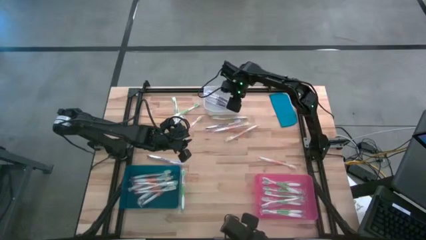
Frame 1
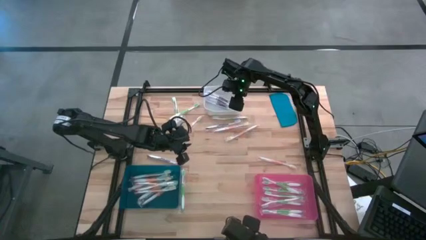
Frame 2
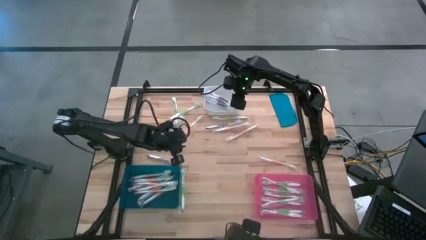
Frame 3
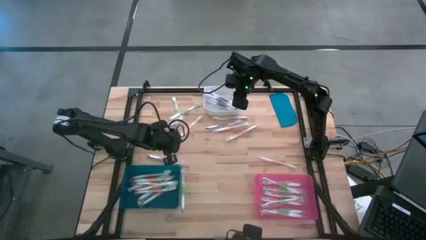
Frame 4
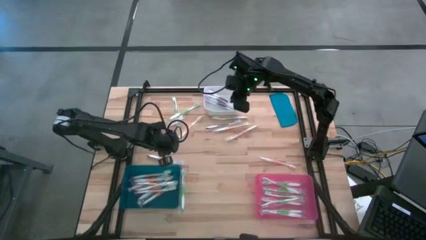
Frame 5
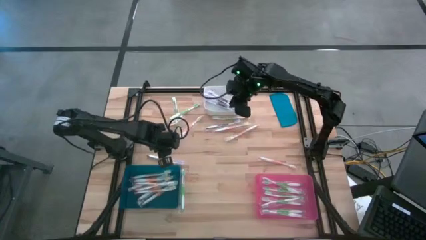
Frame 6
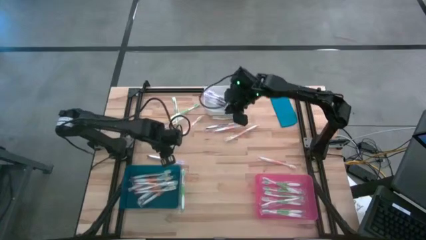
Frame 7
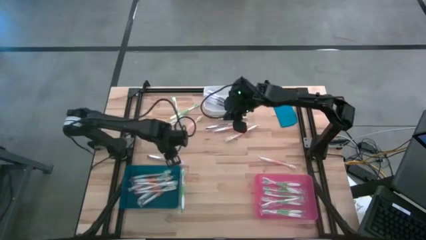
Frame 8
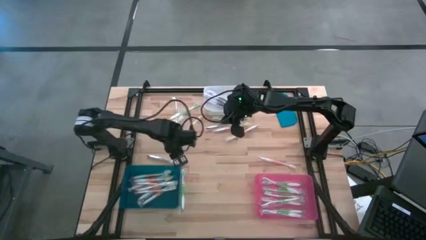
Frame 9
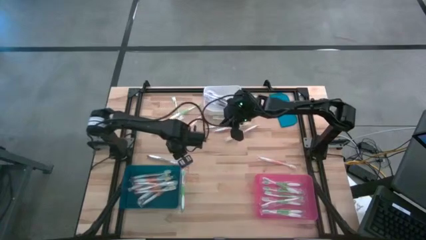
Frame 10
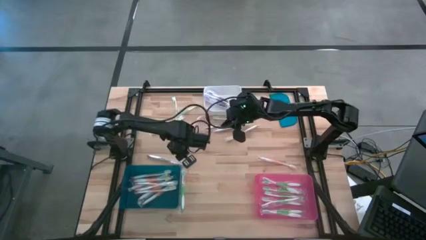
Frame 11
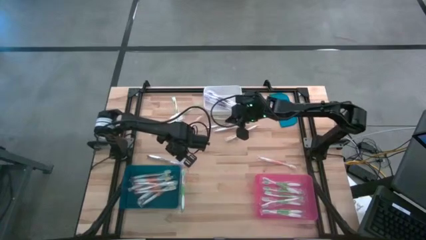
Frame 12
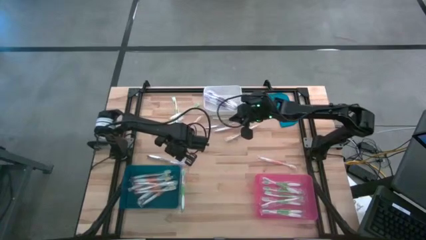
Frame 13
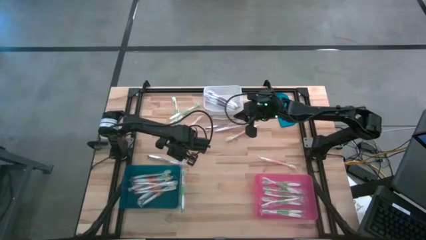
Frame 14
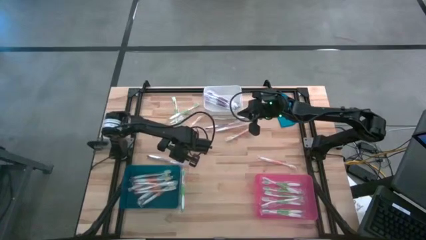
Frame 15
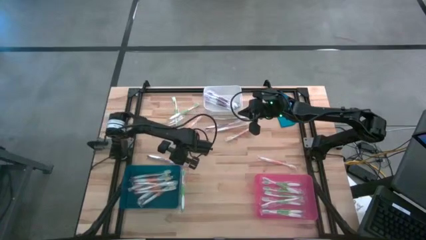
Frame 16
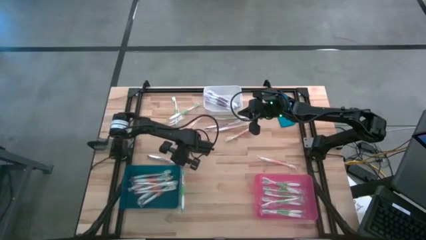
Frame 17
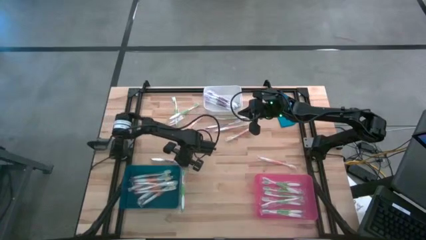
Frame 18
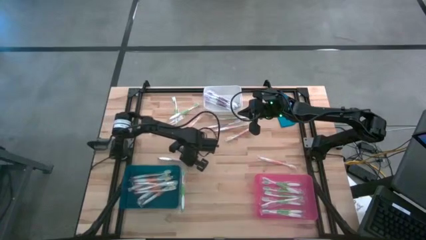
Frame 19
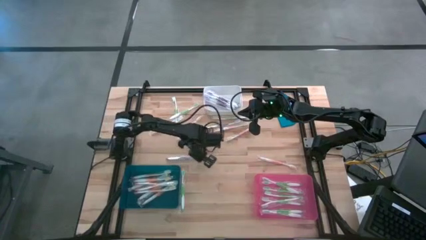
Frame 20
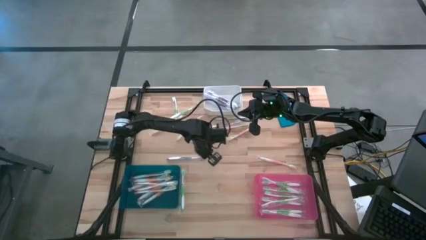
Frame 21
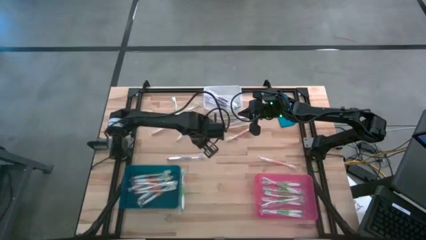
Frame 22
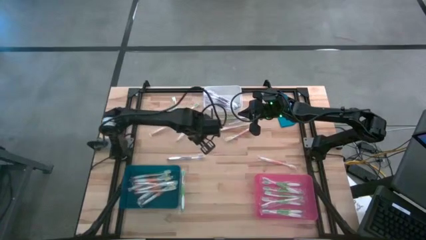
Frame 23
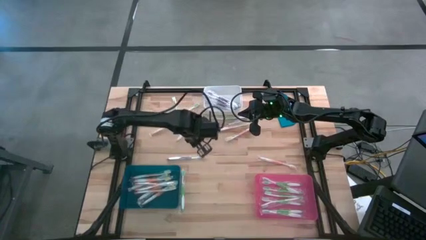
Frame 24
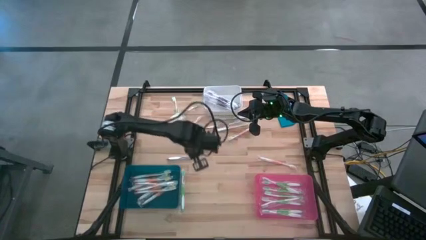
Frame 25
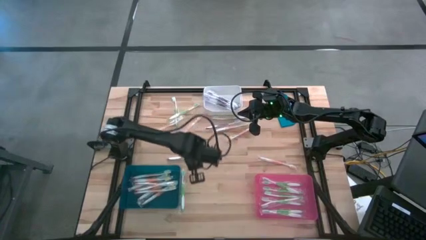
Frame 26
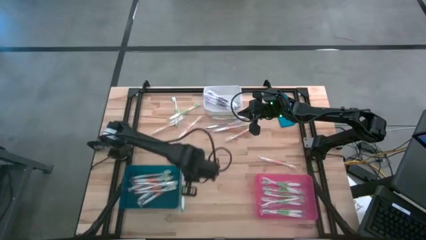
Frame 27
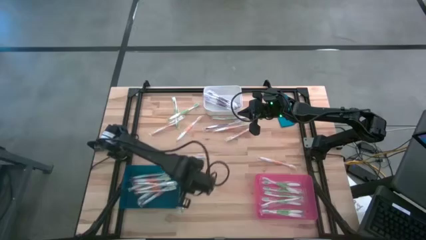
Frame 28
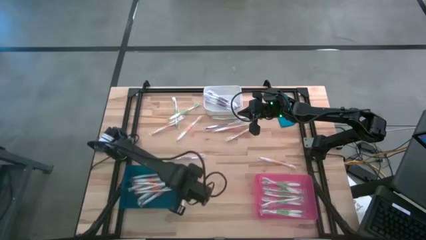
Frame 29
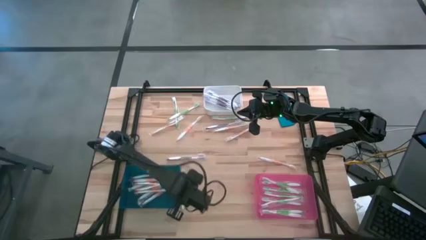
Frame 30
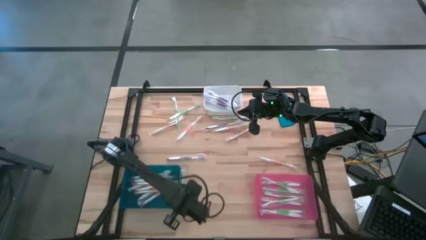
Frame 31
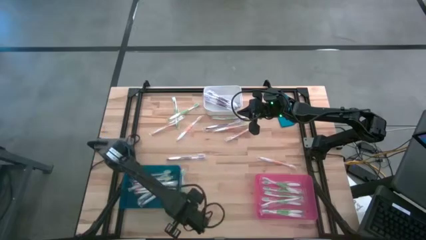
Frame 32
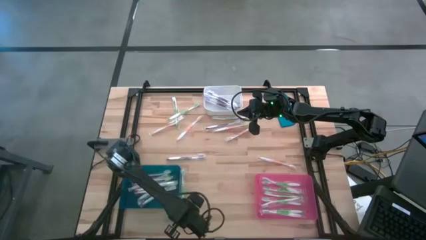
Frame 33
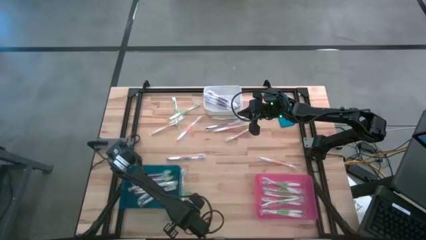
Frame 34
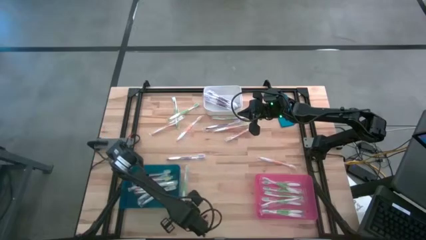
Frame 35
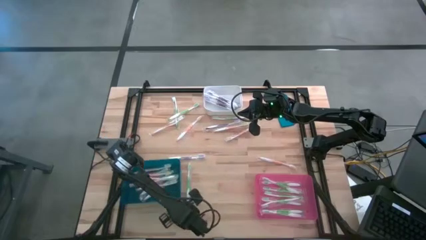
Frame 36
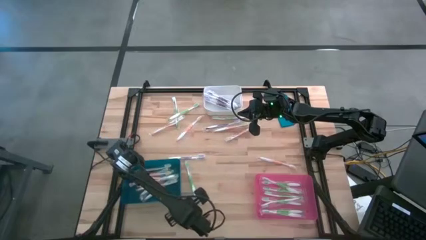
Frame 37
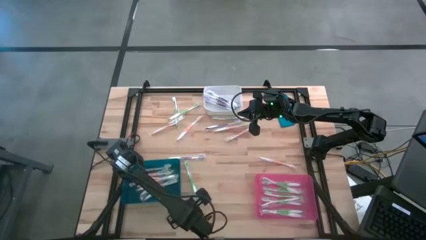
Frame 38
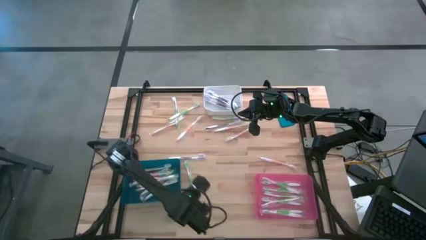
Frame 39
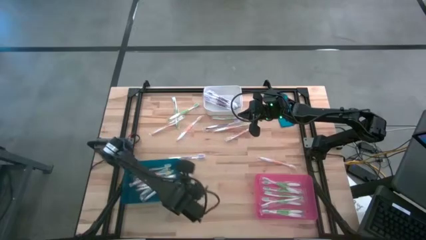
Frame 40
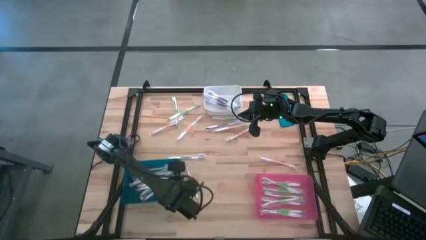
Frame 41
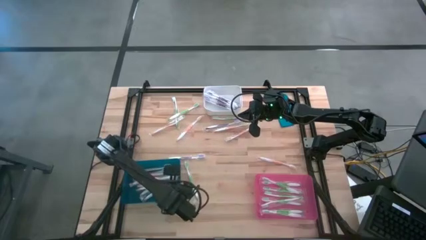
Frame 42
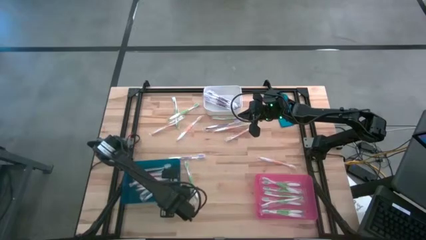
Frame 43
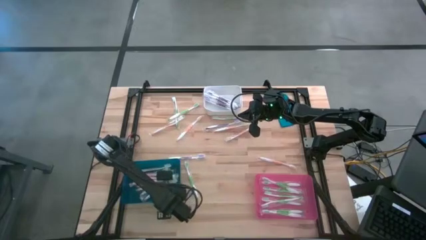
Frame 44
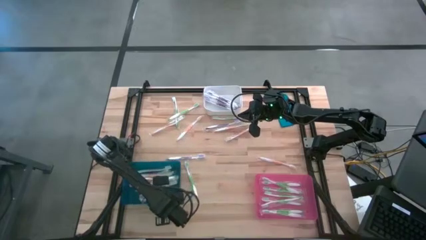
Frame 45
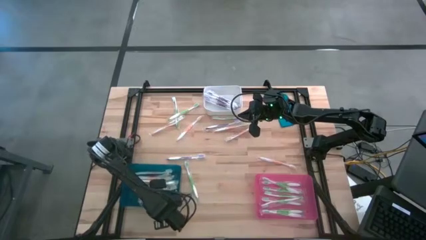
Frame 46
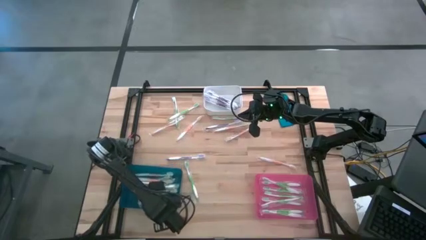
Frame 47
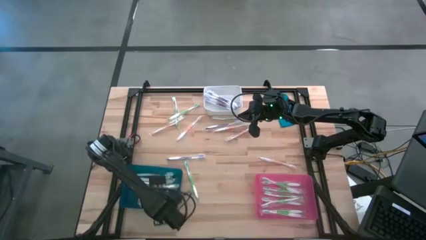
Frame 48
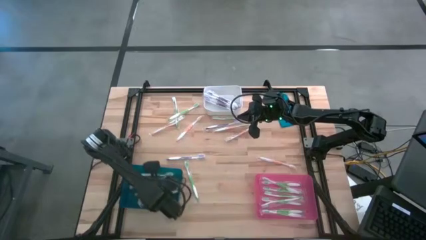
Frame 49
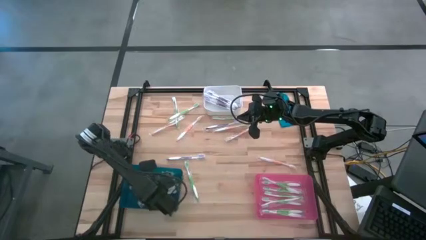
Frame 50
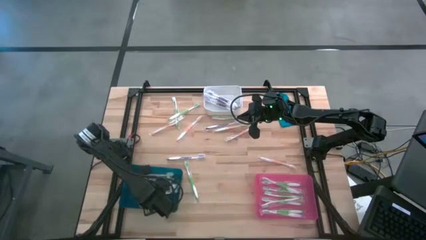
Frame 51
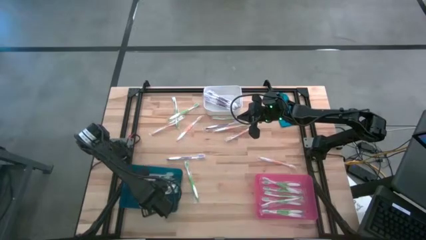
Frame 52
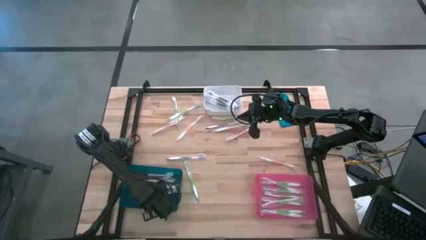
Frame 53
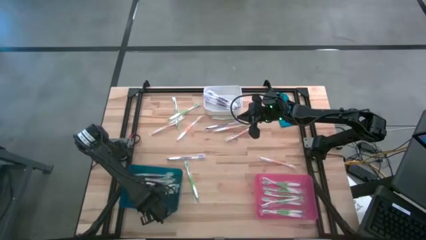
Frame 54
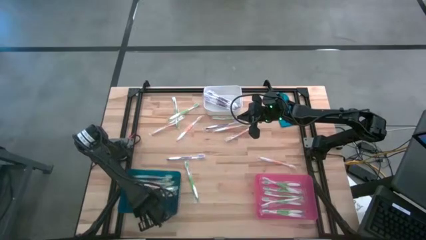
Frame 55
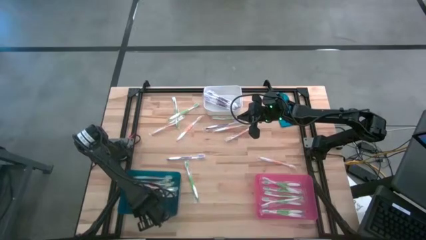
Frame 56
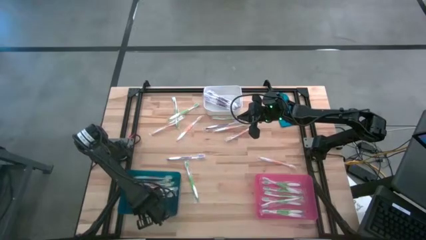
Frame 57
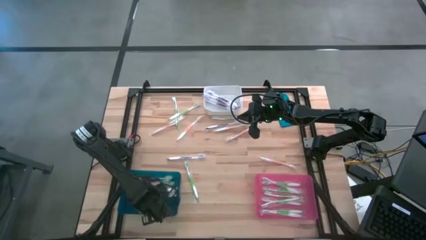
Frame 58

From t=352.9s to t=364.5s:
Task: Pick & Place Toothbrushes
Adjust the blue bin
